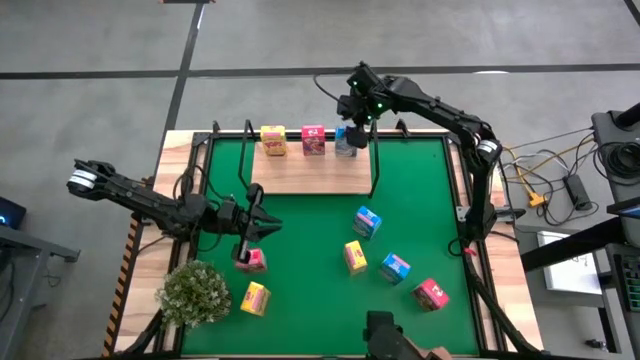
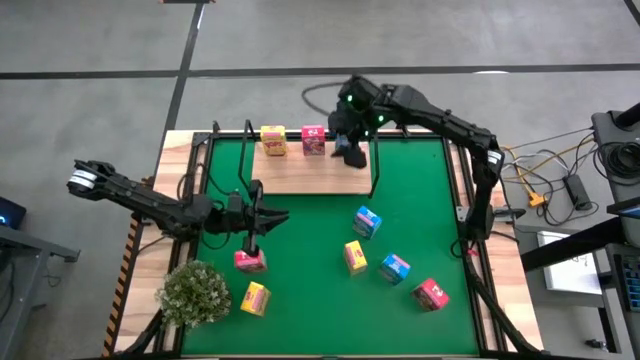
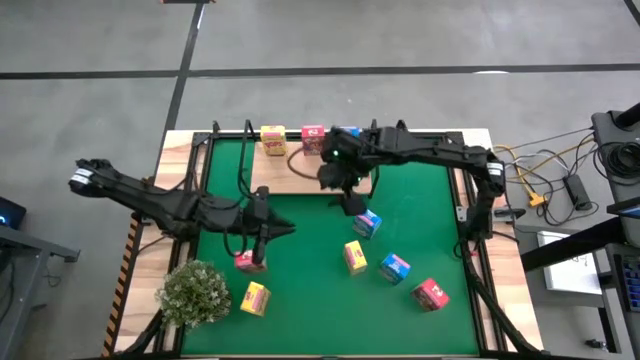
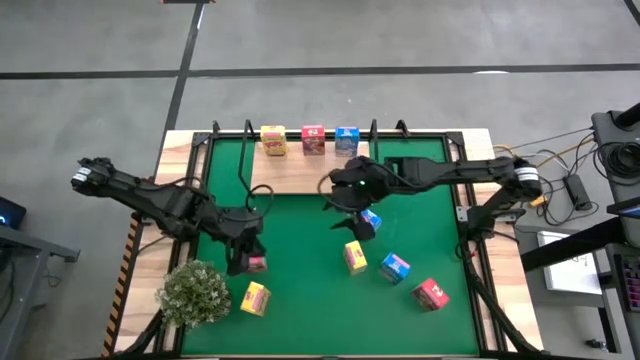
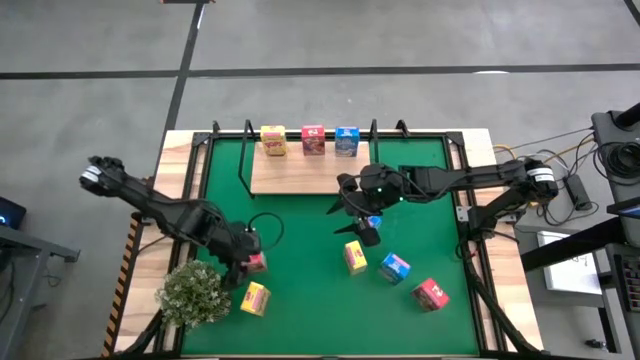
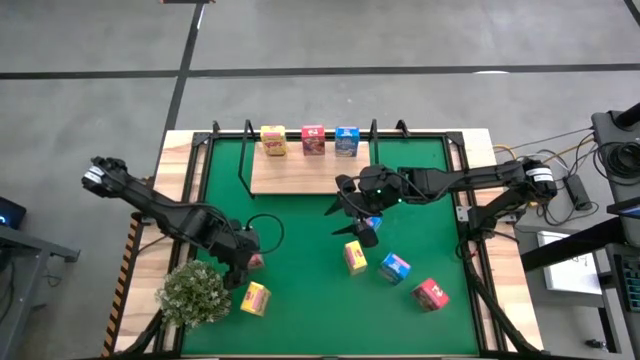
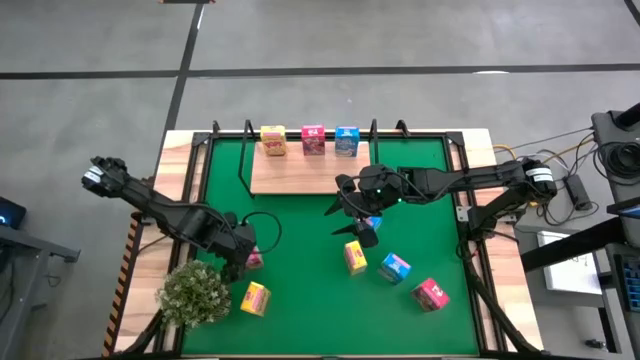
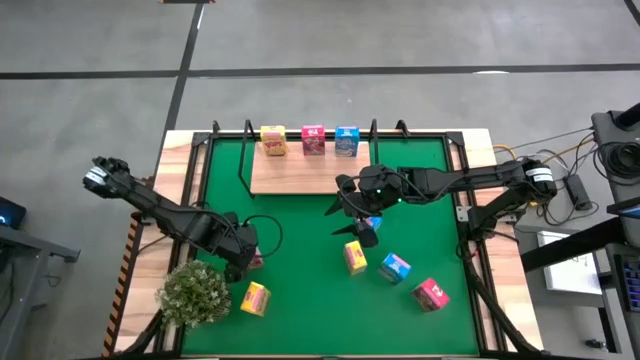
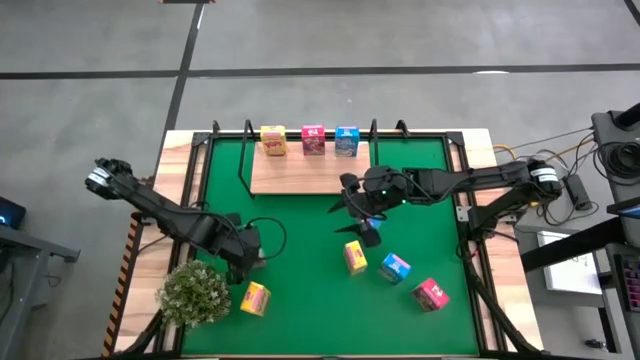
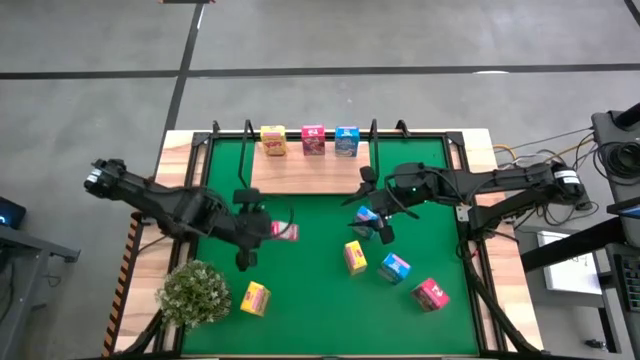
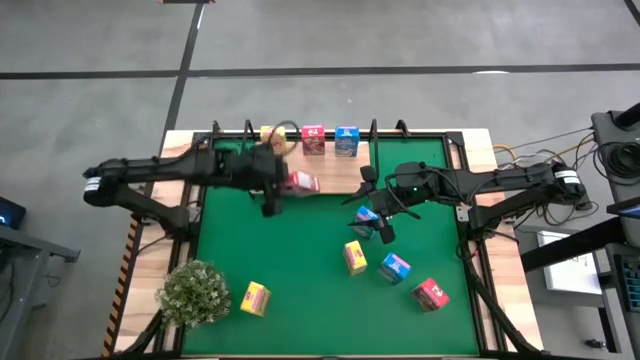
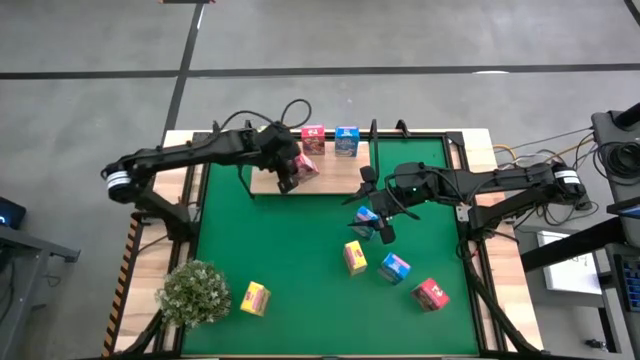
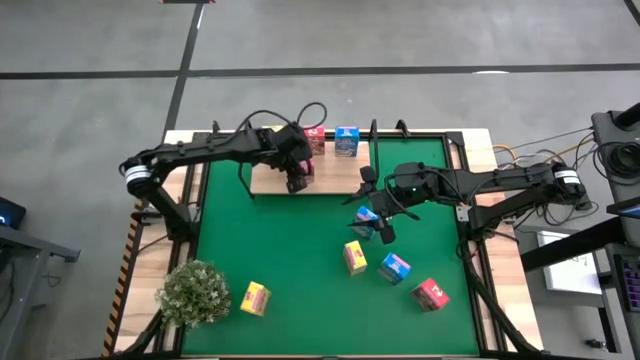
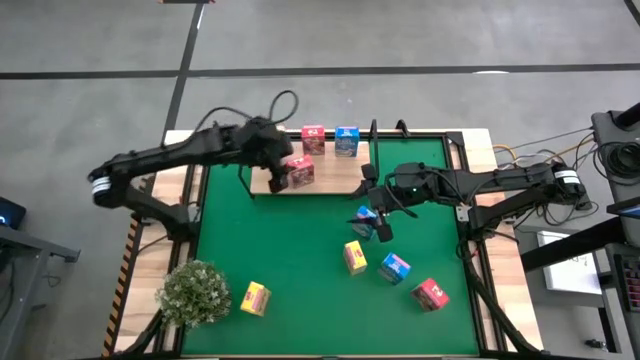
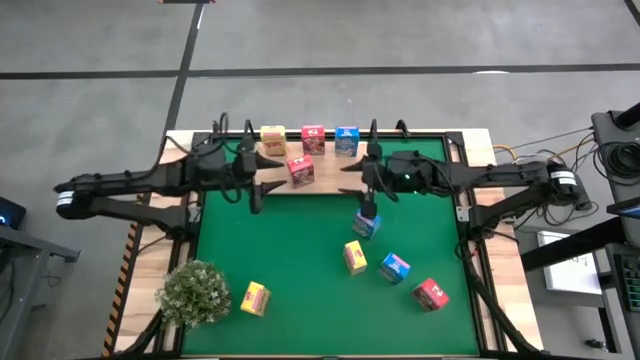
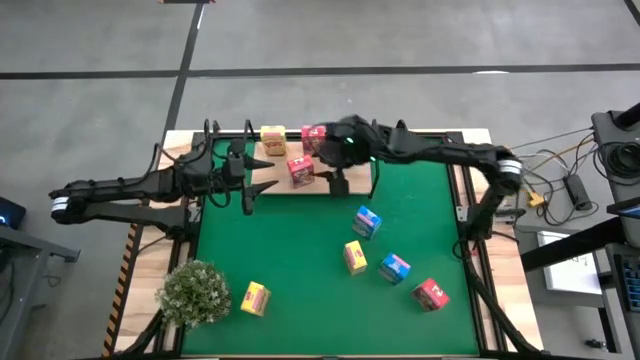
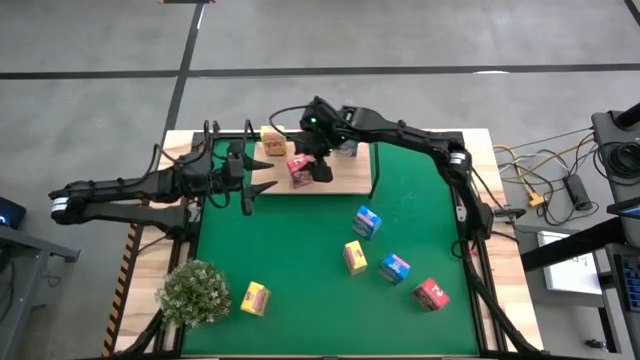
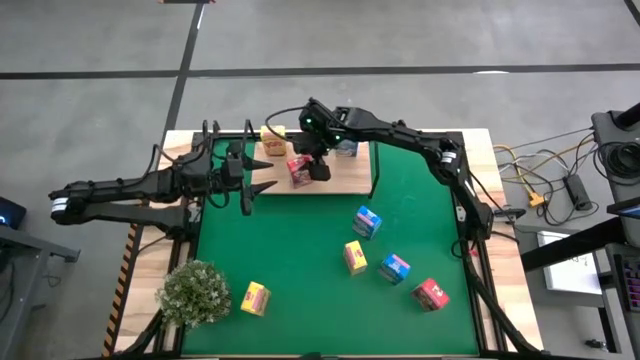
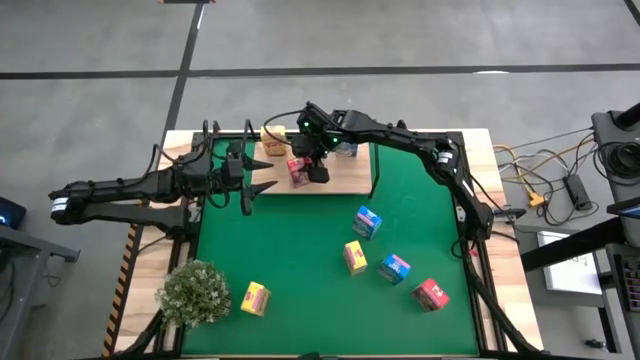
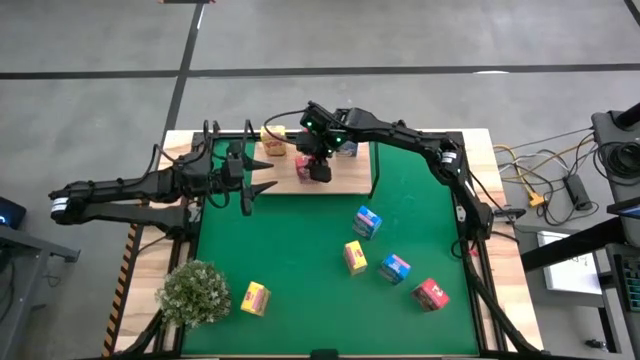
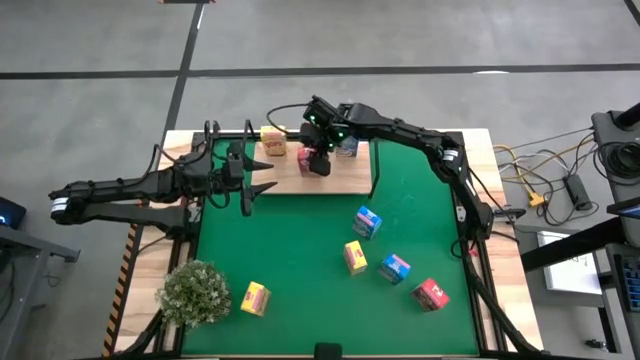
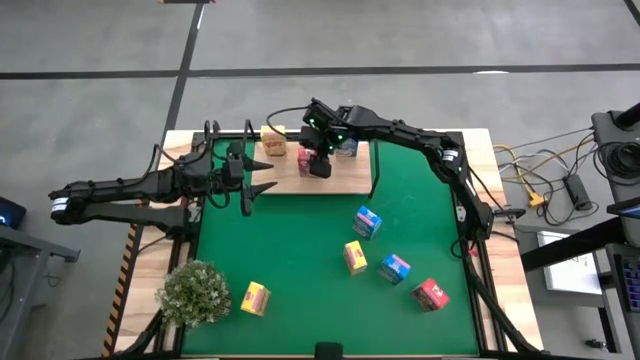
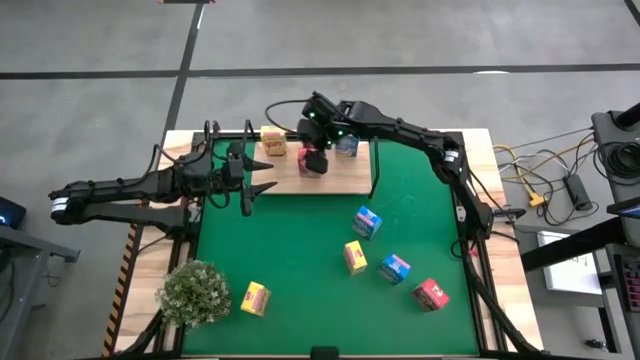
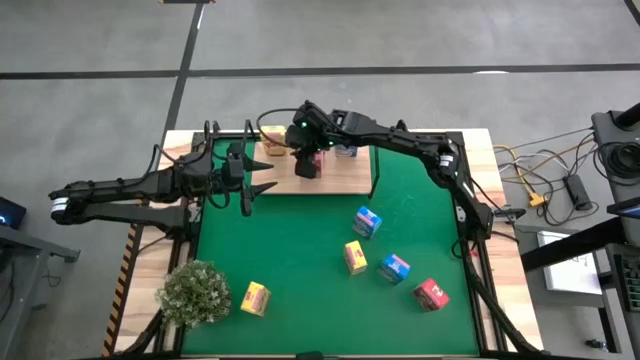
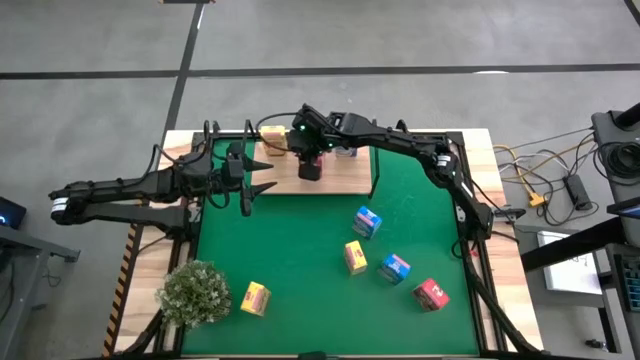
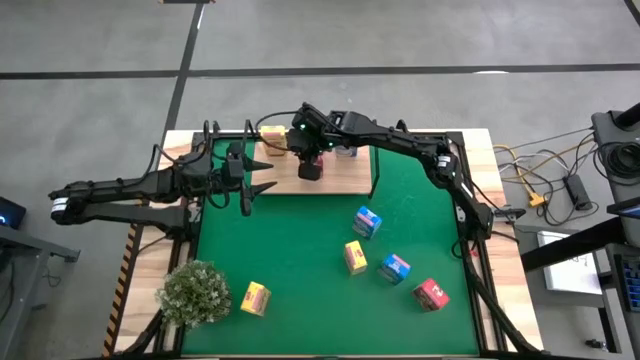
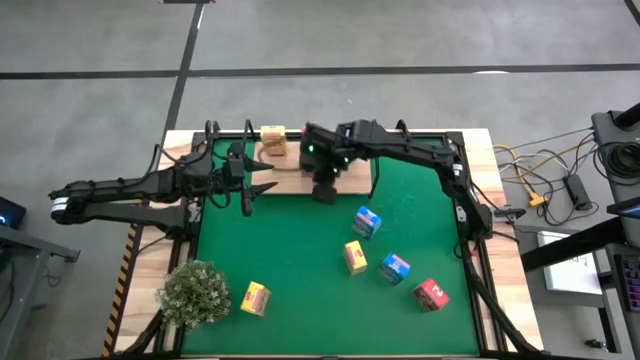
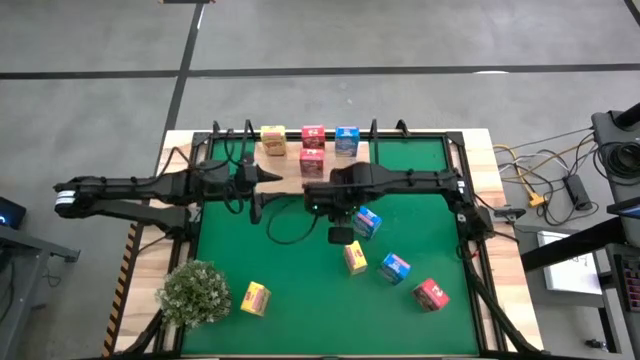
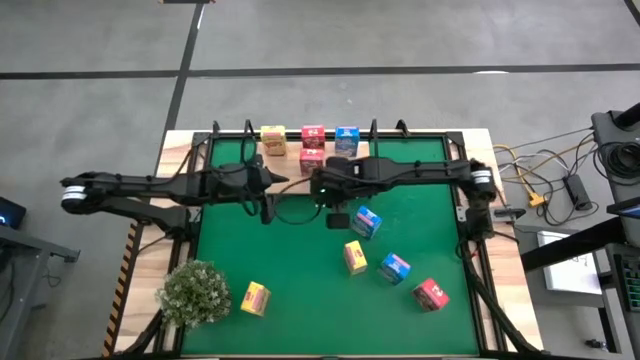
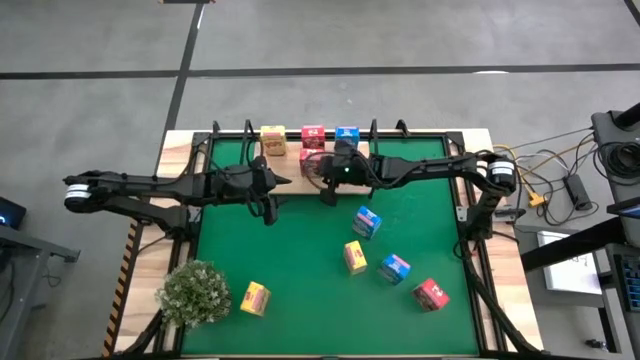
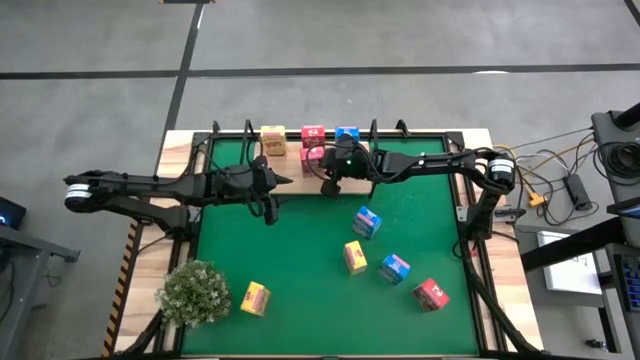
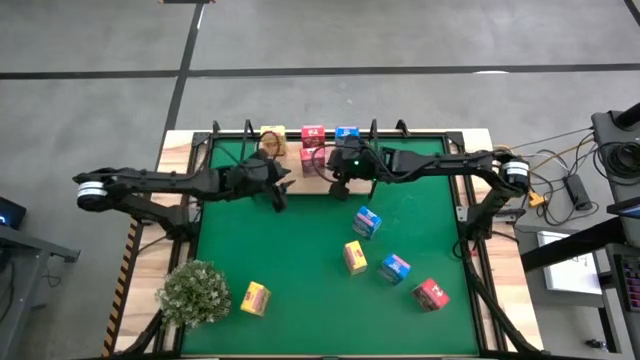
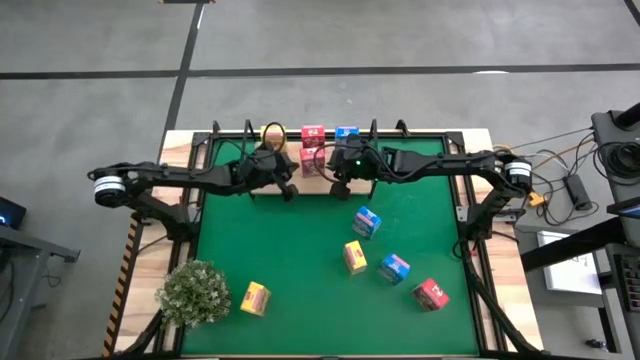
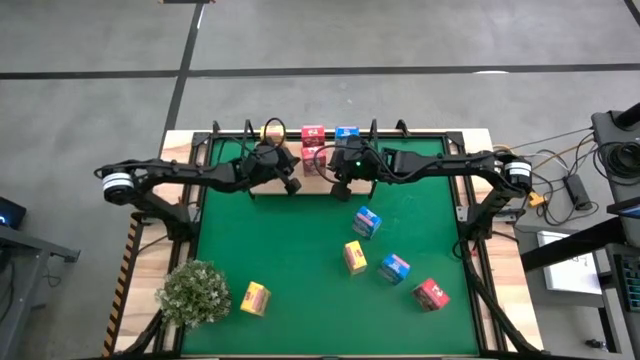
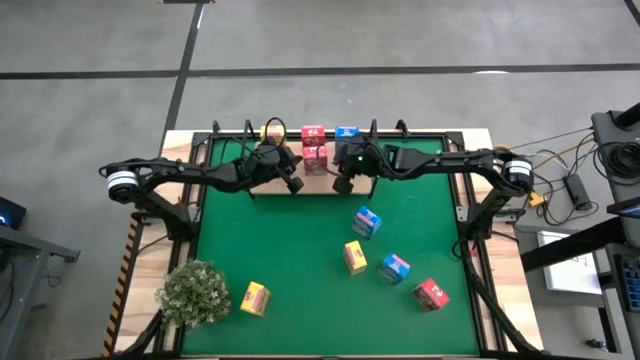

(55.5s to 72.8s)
Task: Stack cereal on shelf
Put the left red cereal box on the shelf aligned with the red cereal box
